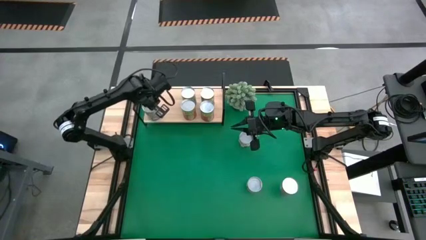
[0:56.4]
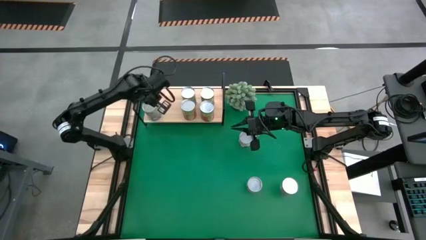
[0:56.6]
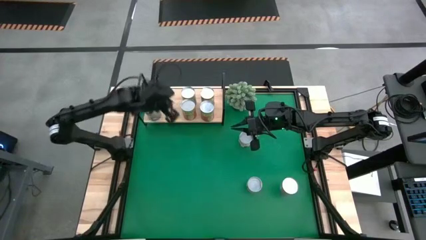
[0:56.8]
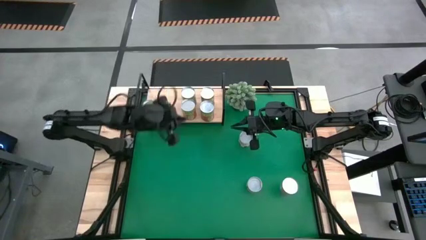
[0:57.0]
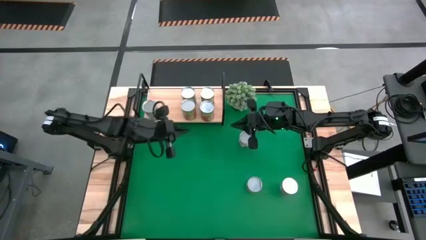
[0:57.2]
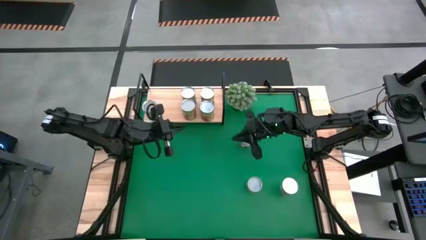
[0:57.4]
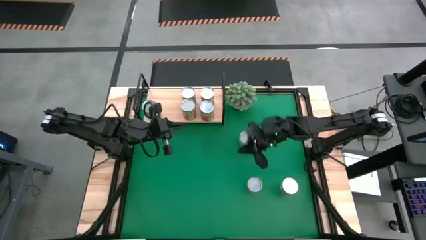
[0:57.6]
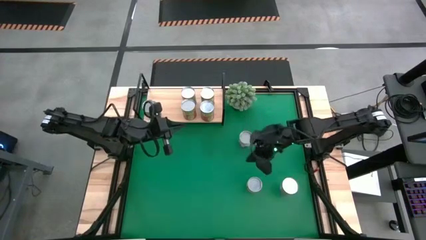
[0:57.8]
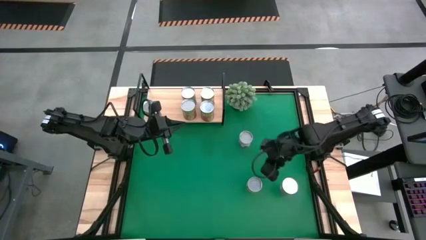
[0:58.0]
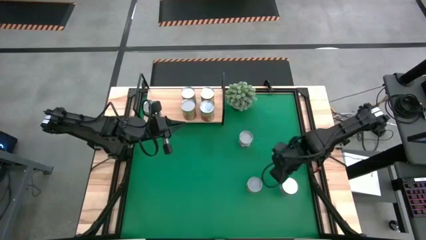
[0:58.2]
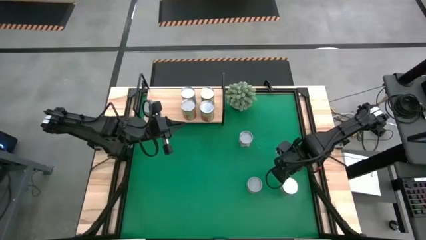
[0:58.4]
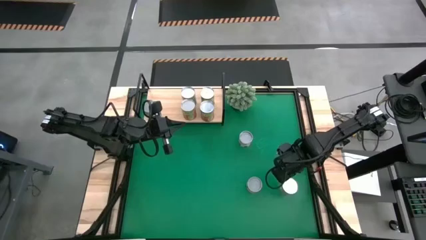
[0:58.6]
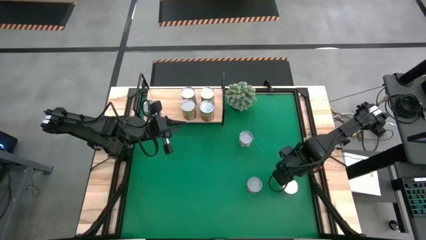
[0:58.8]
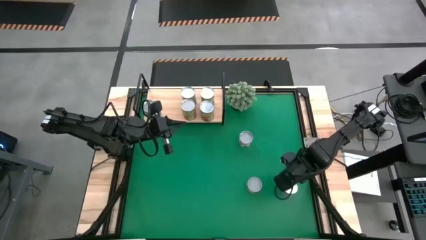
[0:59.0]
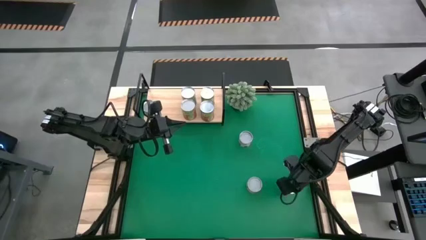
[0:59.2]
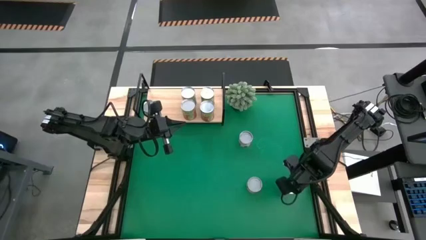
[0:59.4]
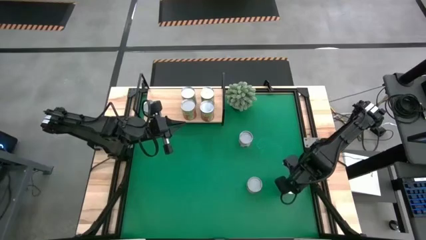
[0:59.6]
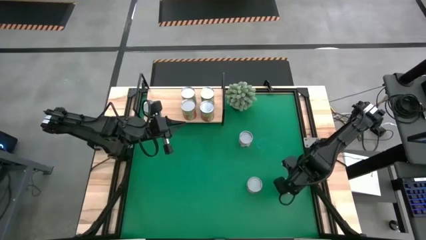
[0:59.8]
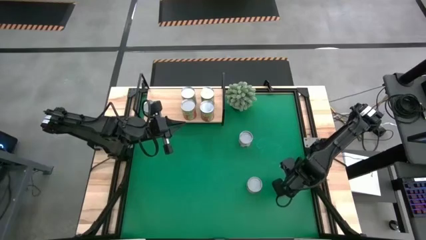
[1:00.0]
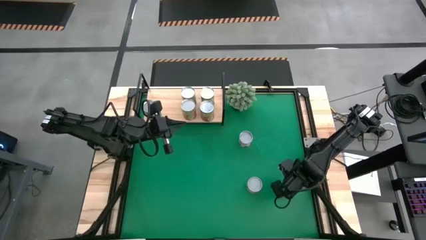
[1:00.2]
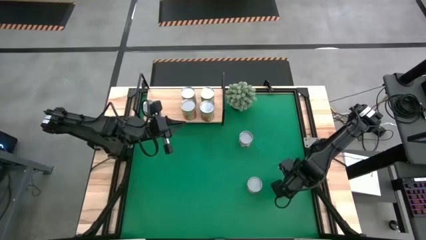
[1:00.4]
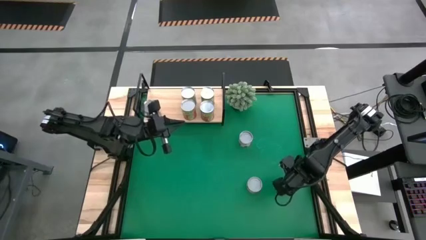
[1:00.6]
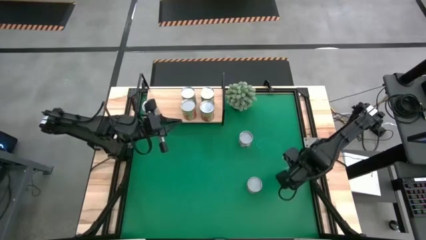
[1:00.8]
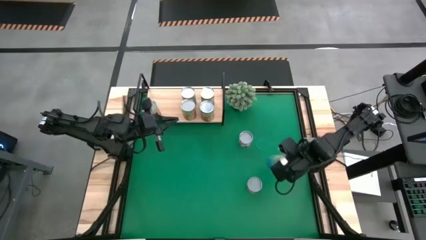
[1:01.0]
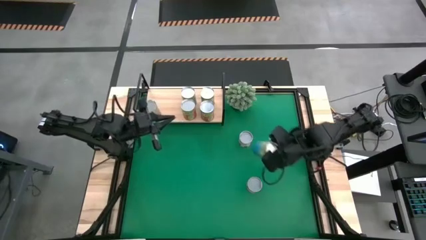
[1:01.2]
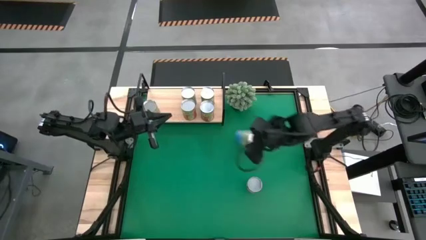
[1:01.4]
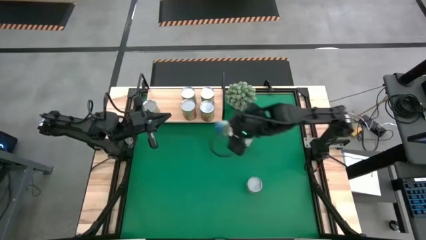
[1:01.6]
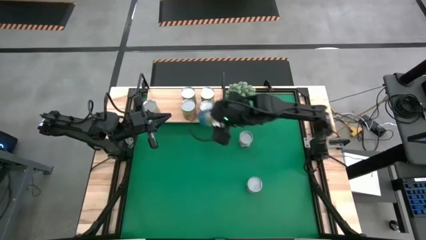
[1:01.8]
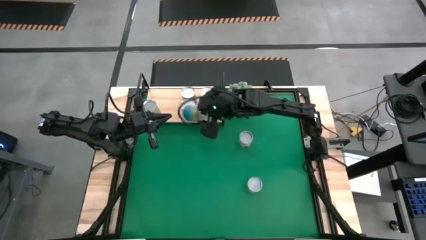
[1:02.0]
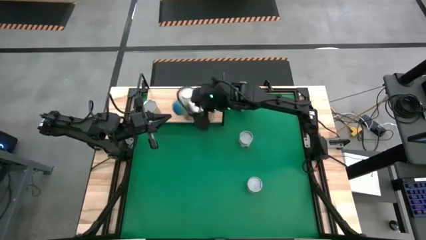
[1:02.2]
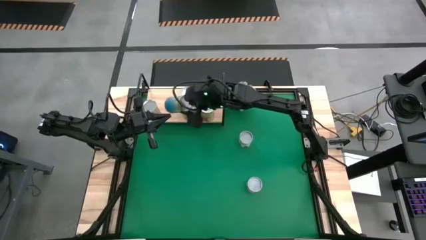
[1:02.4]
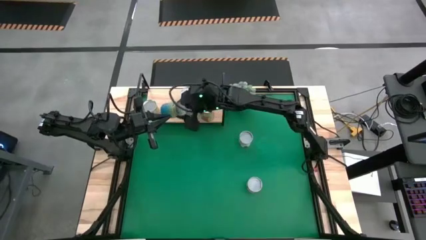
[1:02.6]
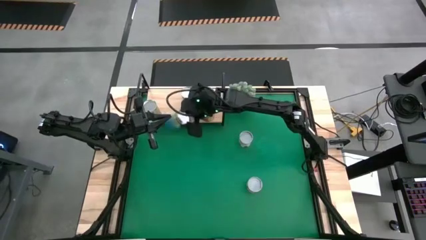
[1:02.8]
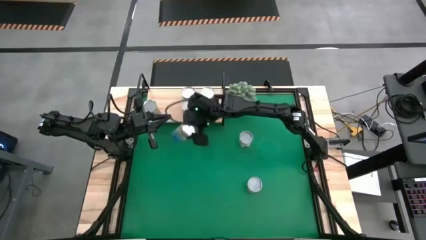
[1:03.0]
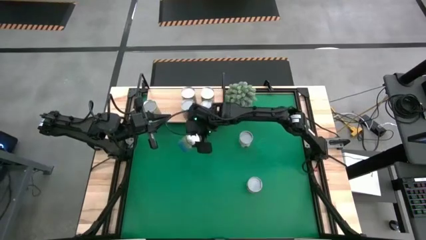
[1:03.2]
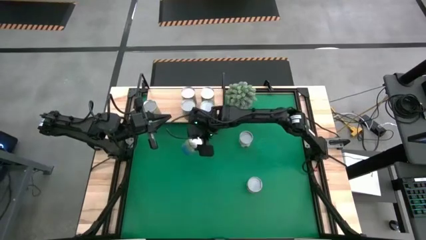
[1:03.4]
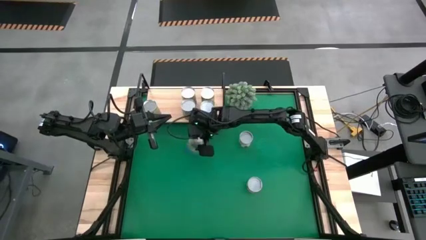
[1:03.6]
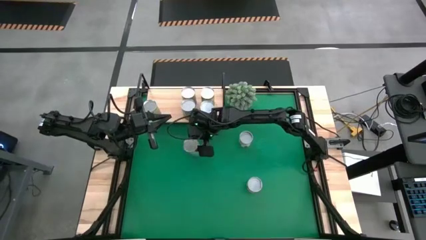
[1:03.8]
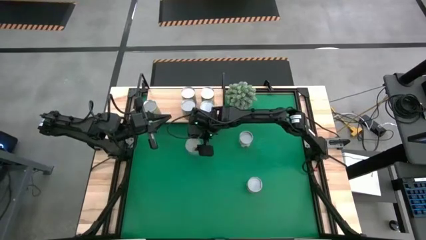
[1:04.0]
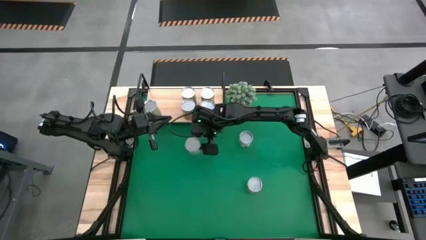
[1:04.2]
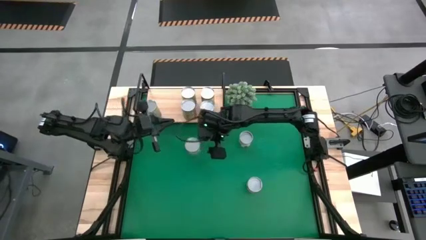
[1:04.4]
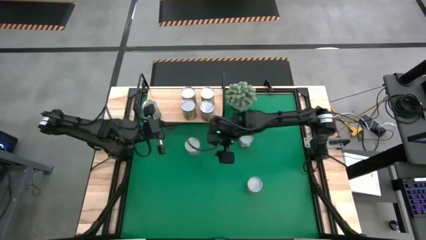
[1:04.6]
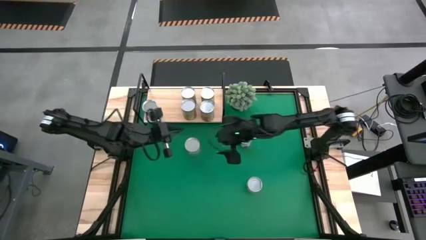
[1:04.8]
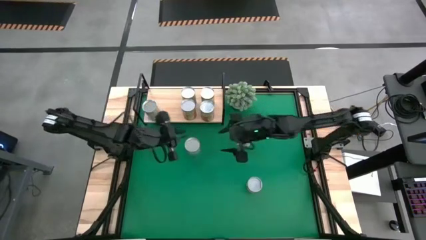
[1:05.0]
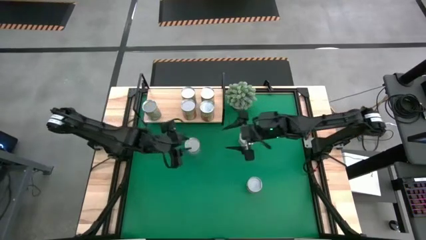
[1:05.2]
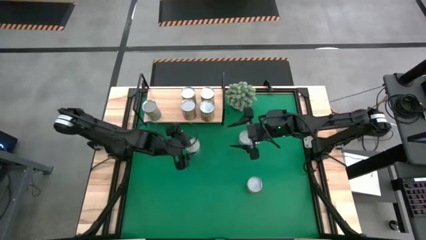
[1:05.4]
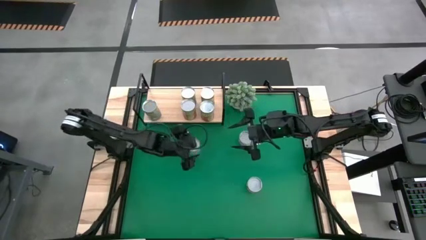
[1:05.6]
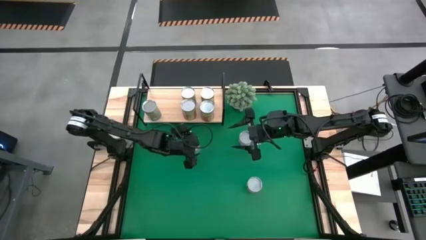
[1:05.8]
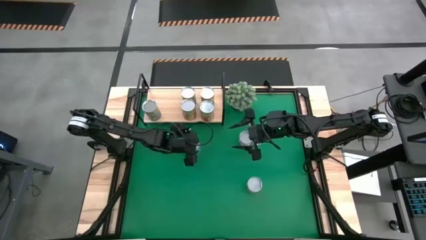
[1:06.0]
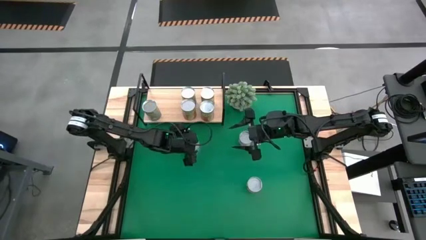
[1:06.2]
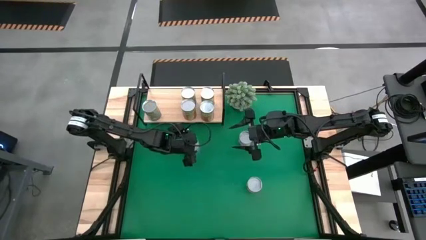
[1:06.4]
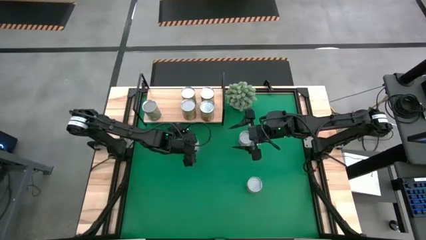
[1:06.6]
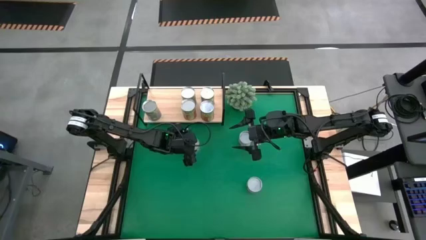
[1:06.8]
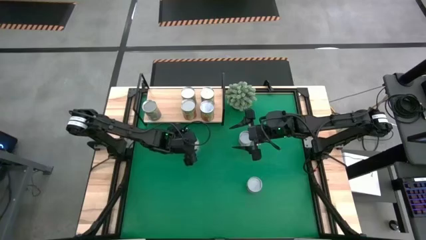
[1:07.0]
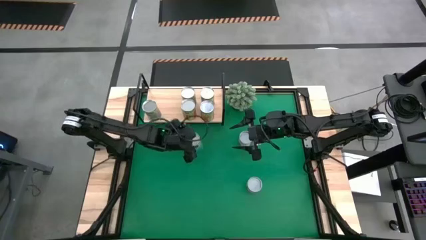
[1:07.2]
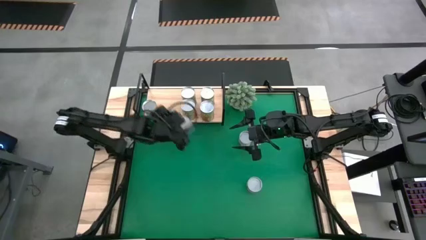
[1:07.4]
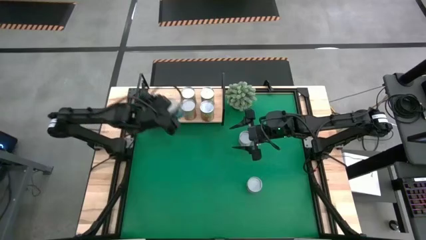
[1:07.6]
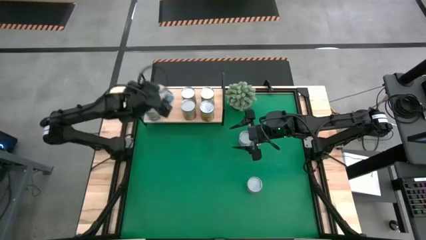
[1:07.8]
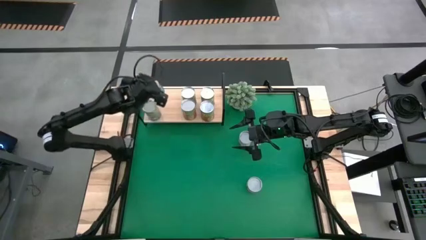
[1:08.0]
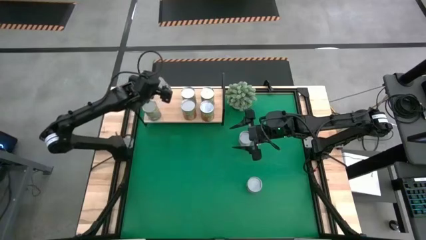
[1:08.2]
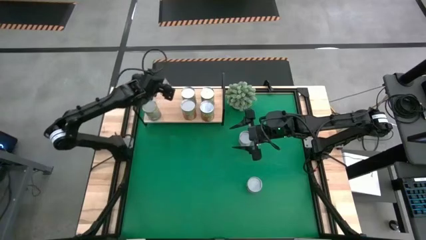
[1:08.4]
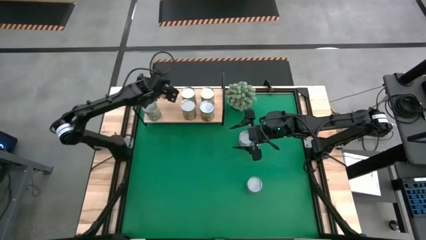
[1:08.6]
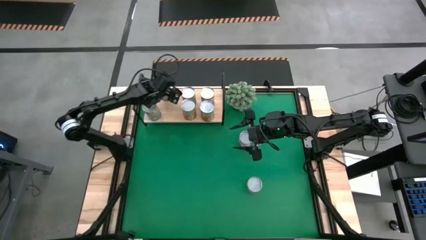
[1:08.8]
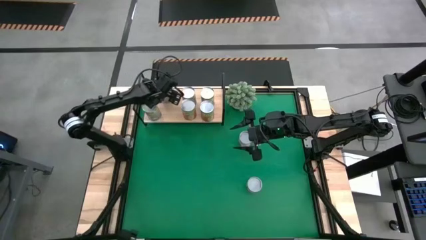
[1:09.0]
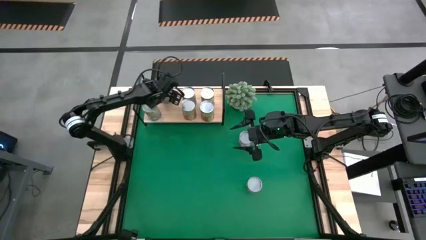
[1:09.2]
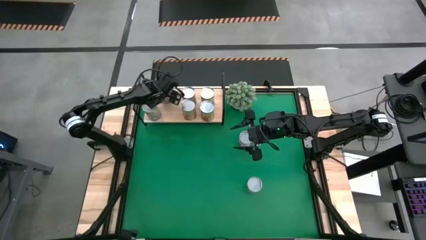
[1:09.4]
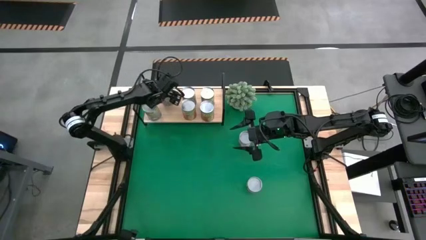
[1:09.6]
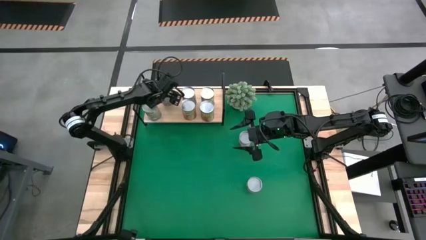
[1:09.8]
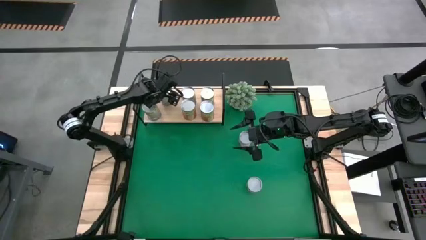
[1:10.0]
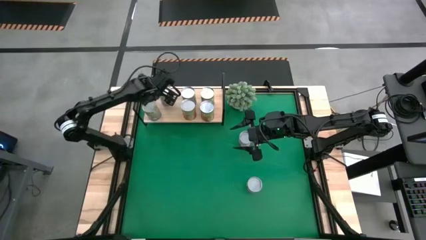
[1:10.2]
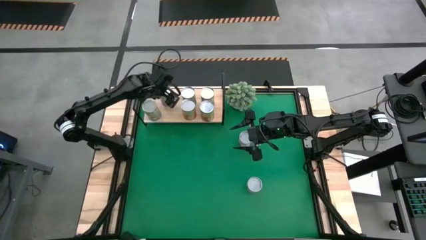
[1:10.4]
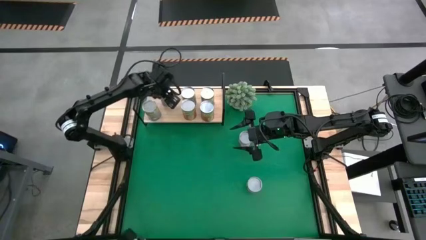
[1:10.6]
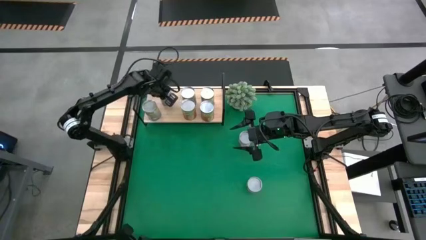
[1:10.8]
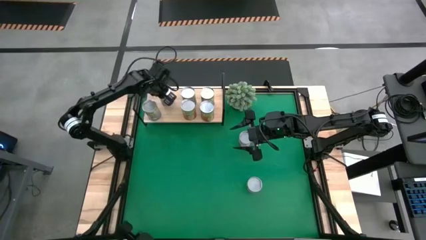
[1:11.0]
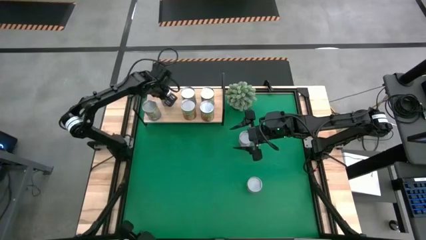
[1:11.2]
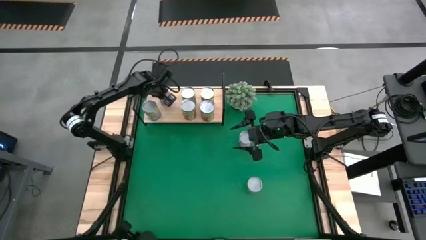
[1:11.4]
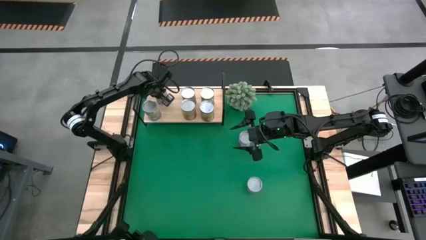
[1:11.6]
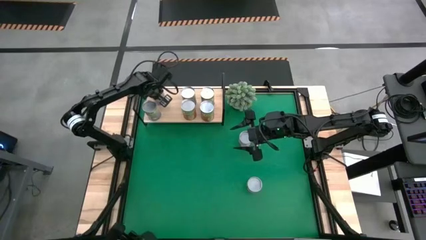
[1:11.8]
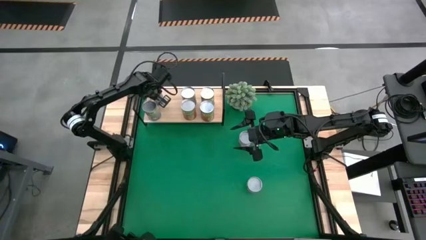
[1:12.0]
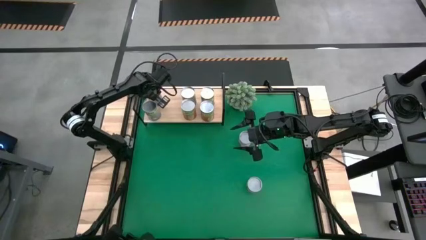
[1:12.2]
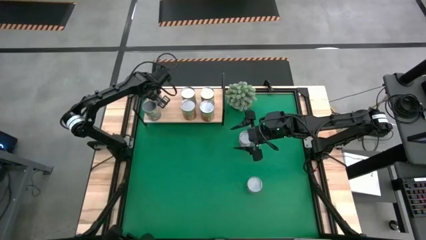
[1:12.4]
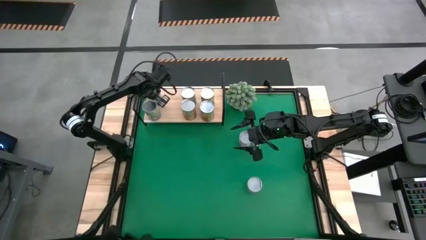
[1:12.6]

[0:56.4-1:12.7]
Task: Pick and place cans onto a shelf
Put the canned cherries on the shelf
